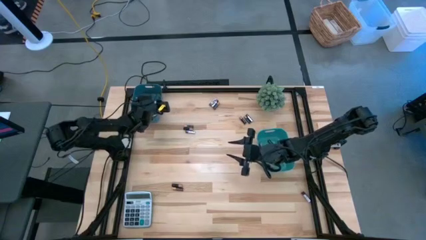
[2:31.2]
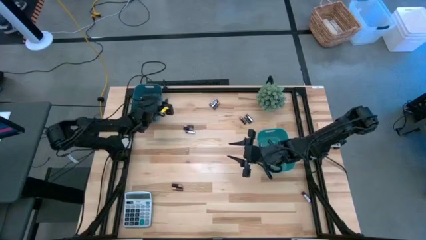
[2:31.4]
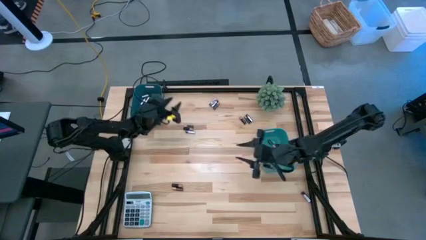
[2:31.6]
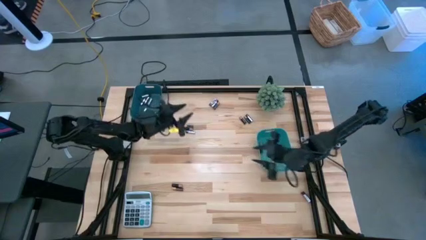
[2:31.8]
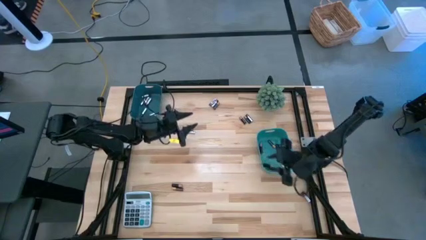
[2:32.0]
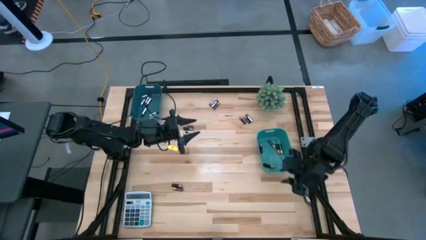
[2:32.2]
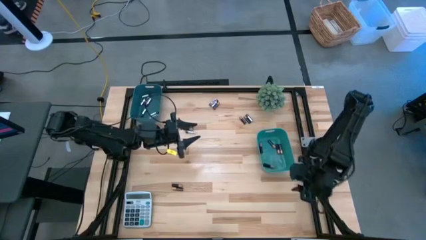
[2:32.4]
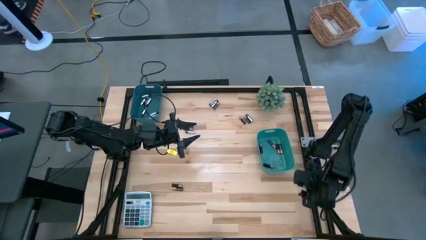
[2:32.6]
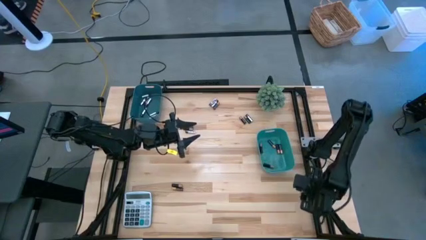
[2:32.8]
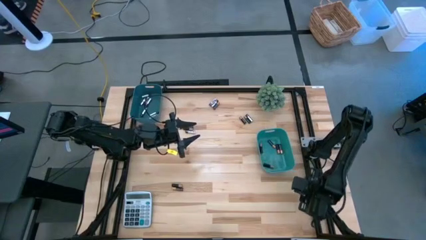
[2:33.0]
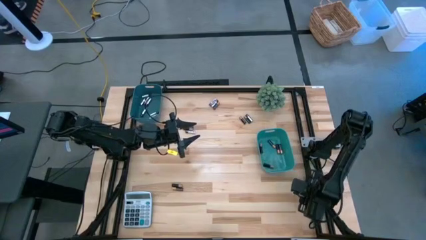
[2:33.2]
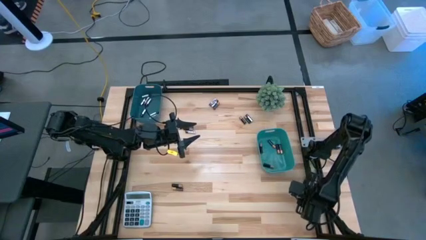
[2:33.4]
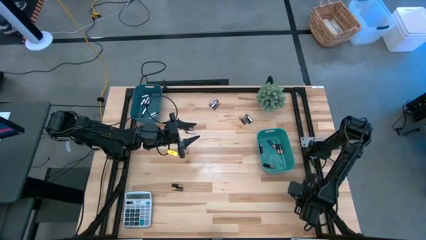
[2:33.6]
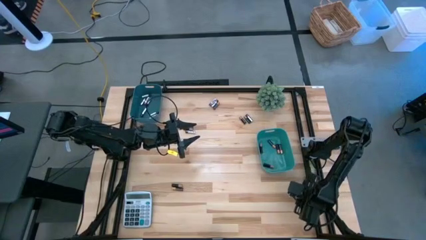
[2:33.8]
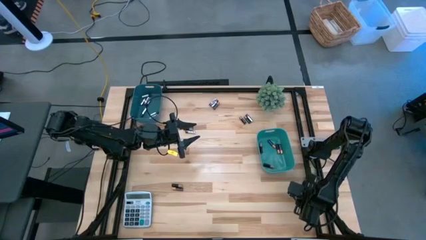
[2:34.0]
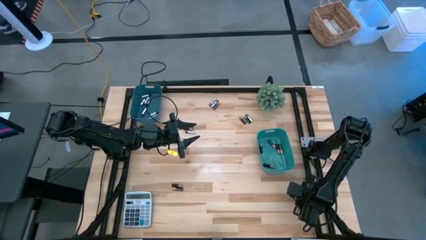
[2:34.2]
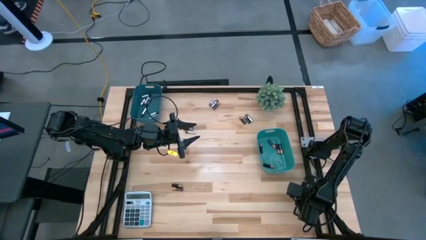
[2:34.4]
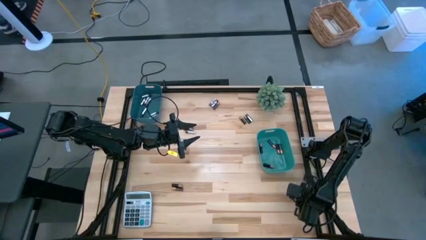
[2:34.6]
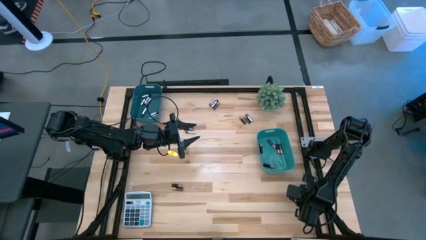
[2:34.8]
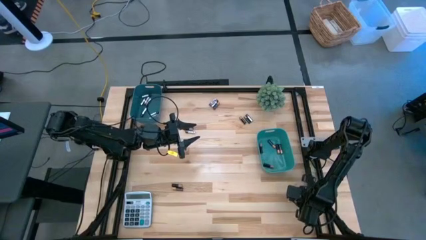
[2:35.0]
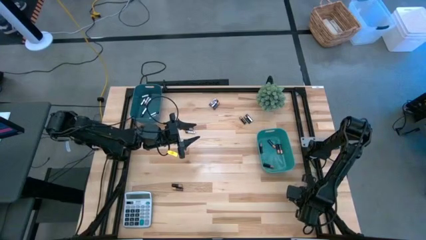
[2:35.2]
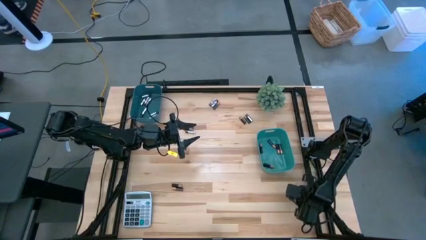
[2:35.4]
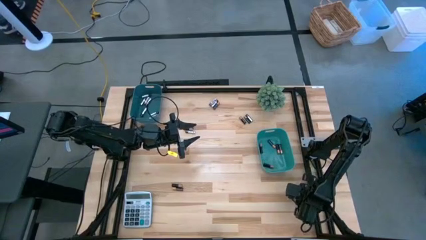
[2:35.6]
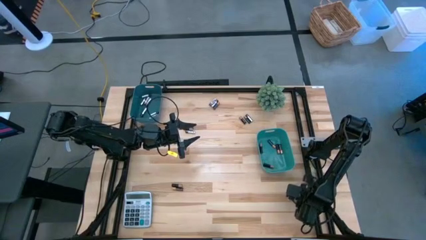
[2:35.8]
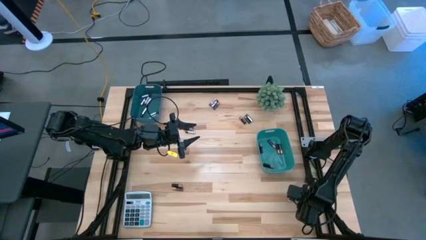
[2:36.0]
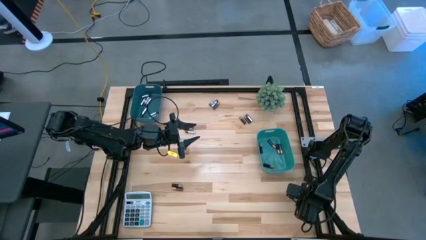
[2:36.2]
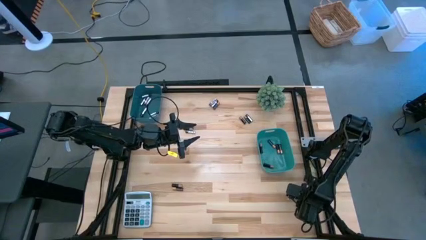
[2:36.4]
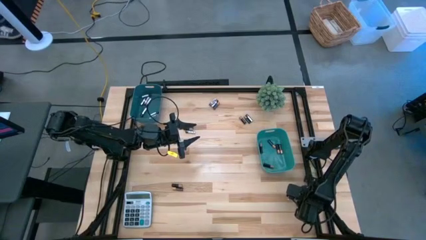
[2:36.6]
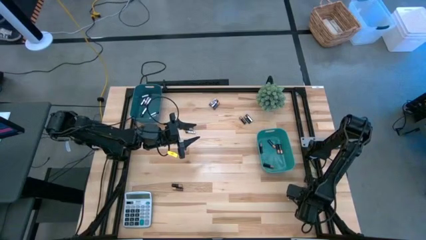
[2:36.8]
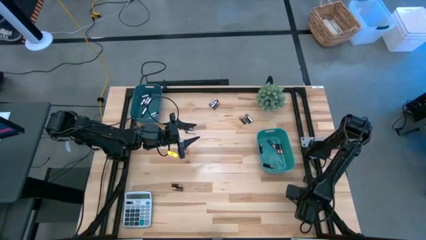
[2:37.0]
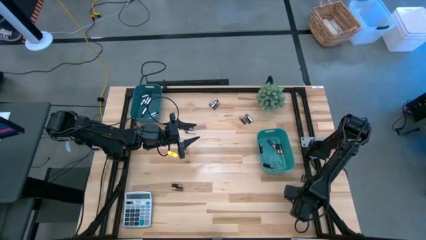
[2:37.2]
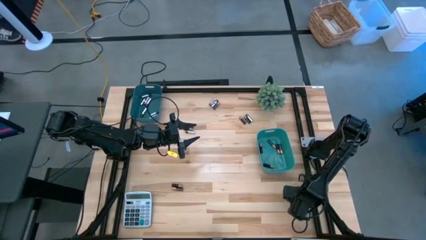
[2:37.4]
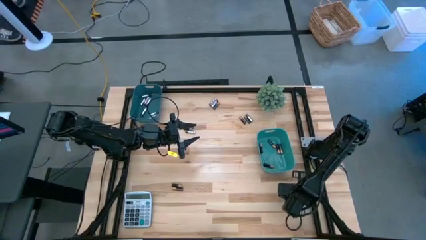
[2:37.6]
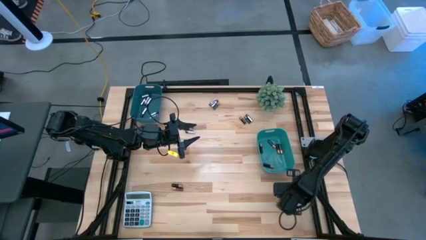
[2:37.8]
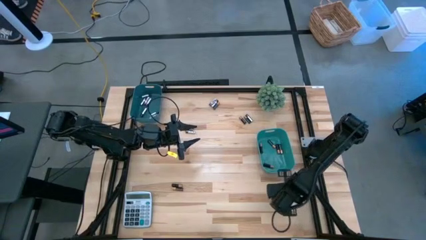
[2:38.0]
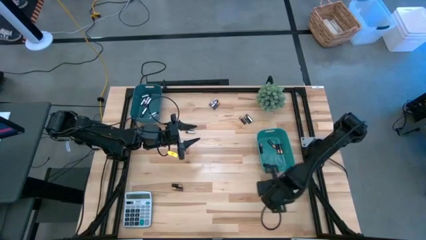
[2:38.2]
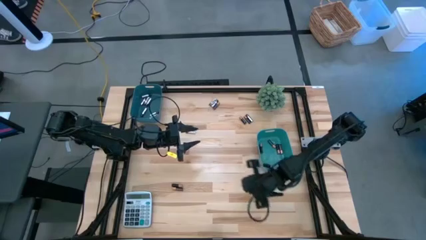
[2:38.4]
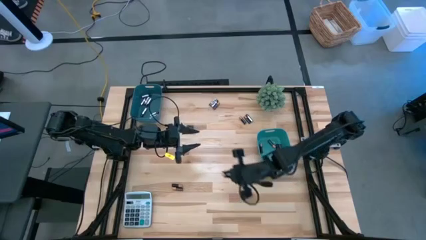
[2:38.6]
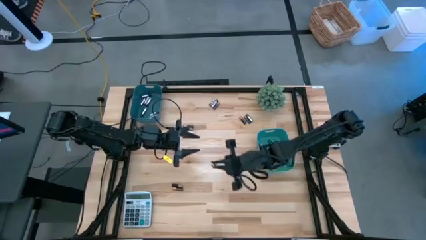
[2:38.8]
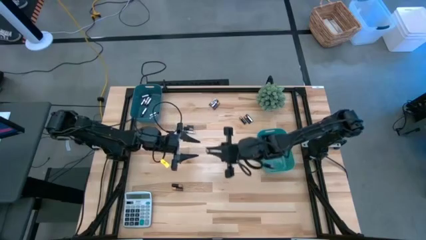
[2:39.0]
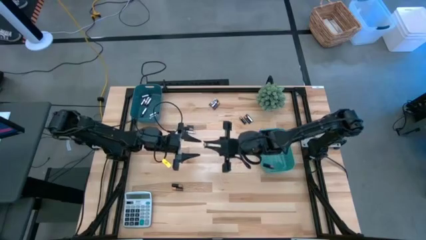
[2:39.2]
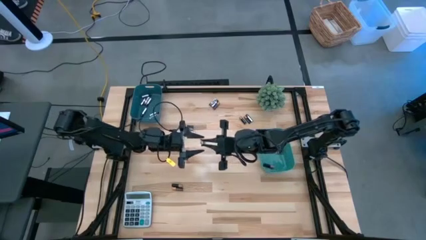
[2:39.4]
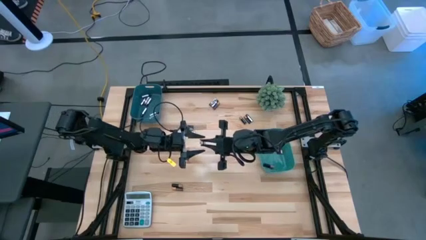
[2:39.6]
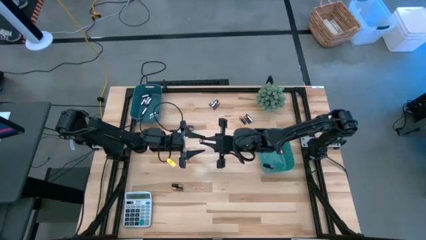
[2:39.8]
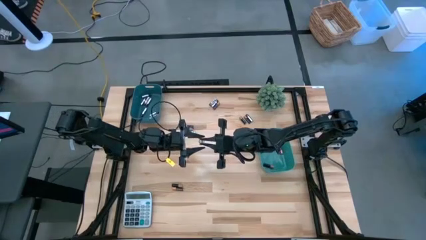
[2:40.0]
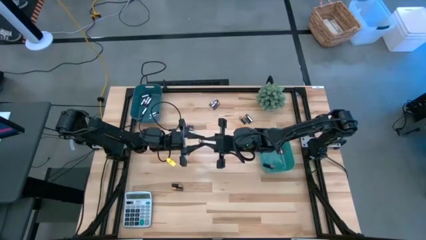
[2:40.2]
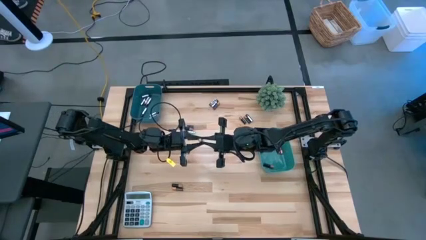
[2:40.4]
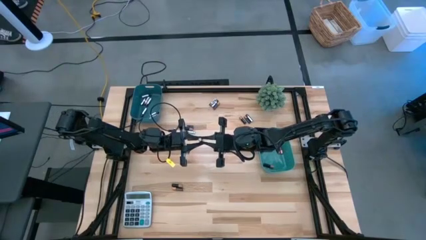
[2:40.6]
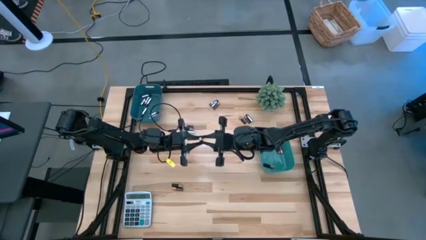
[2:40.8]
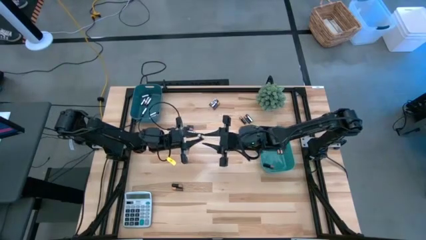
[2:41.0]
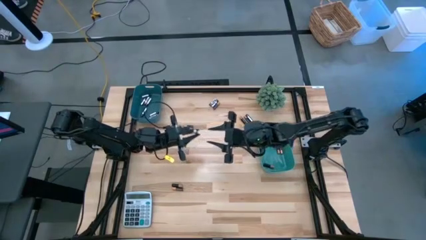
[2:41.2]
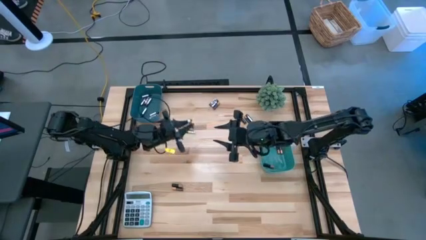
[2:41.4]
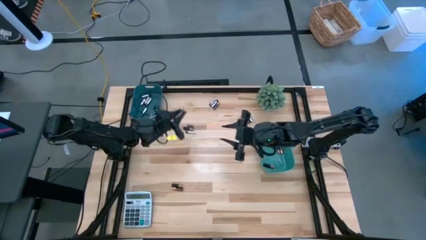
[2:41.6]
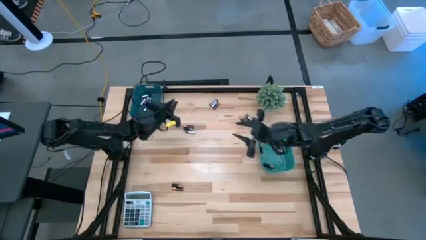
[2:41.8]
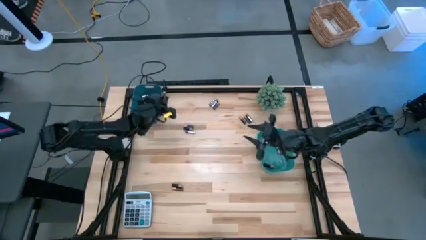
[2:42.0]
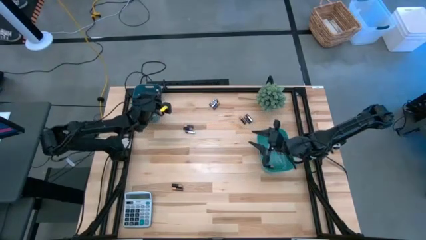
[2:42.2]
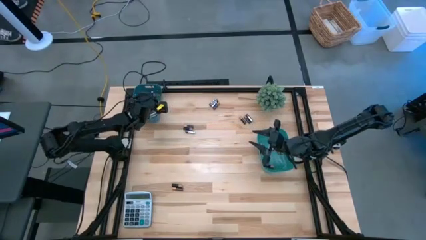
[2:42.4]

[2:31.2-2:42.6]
Task: Sort batteries
Put the black-silver battery into the blue bin

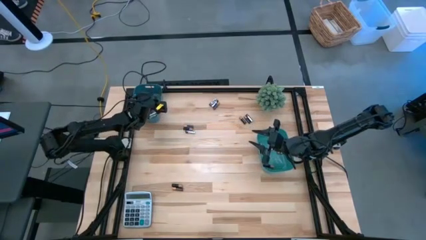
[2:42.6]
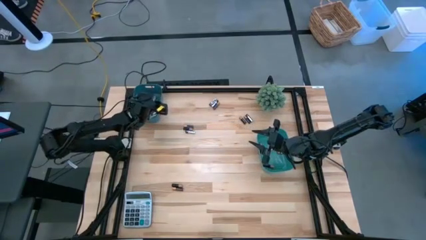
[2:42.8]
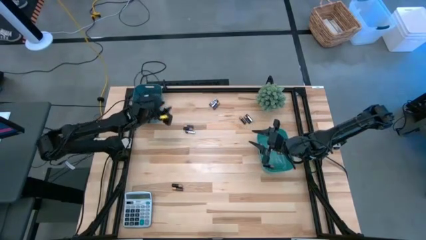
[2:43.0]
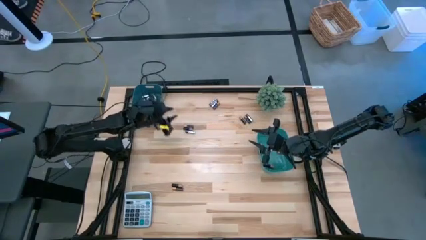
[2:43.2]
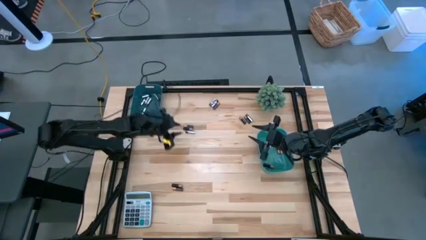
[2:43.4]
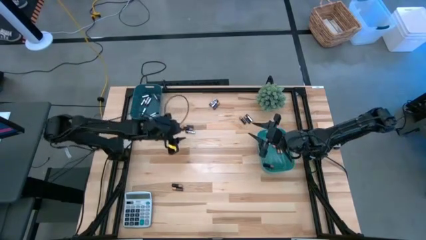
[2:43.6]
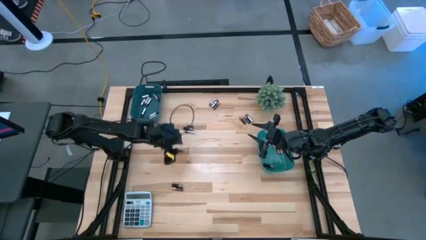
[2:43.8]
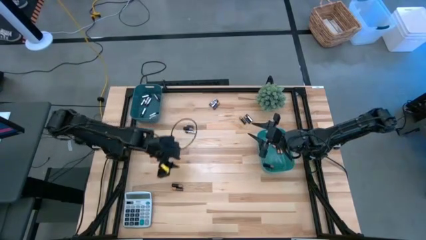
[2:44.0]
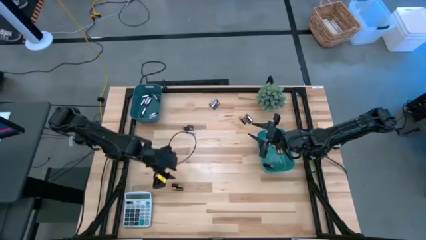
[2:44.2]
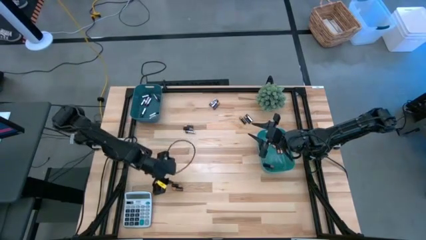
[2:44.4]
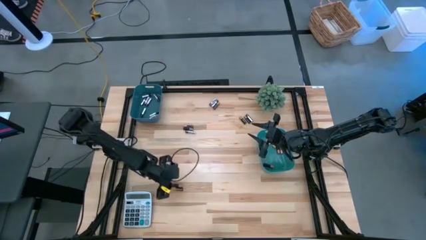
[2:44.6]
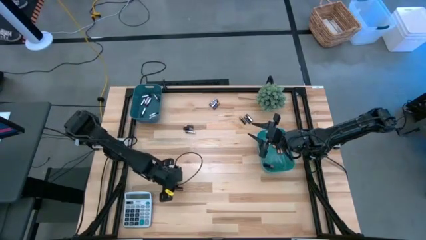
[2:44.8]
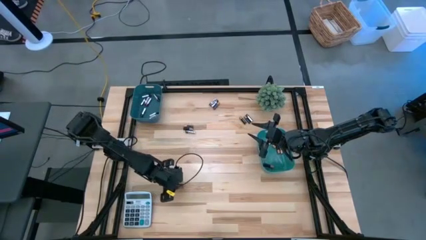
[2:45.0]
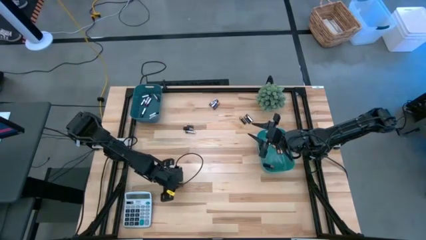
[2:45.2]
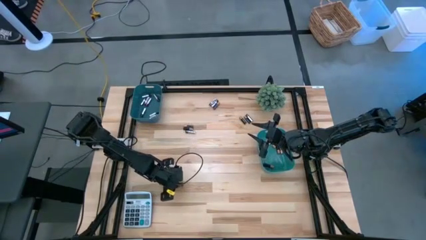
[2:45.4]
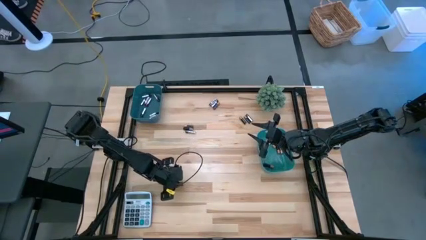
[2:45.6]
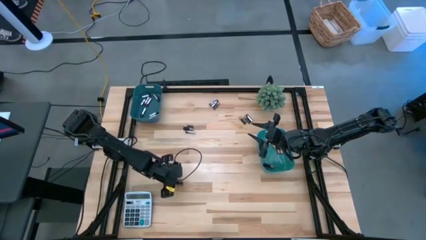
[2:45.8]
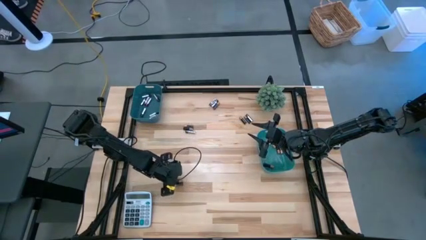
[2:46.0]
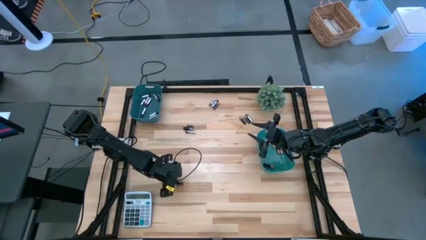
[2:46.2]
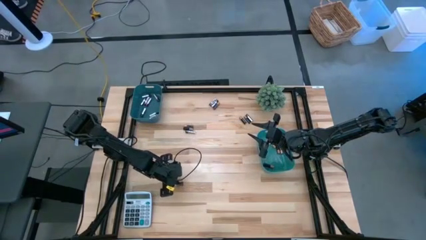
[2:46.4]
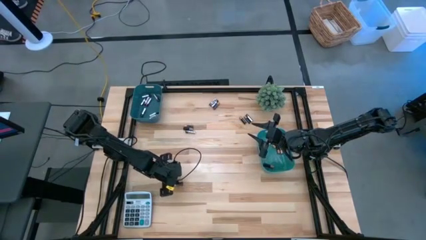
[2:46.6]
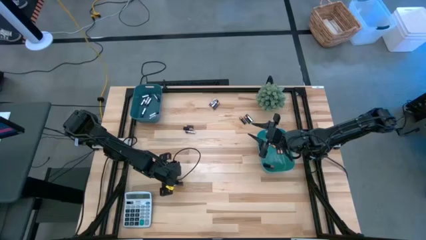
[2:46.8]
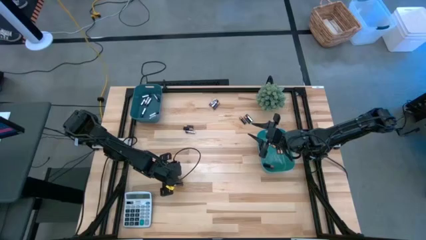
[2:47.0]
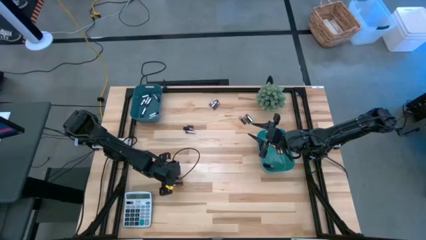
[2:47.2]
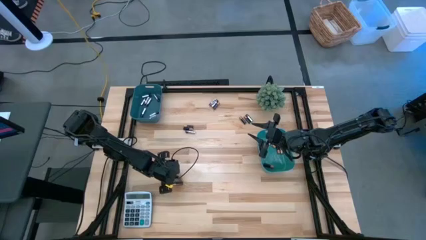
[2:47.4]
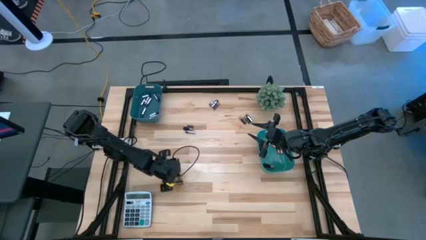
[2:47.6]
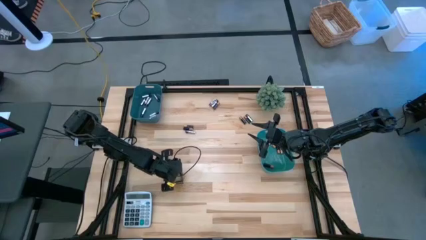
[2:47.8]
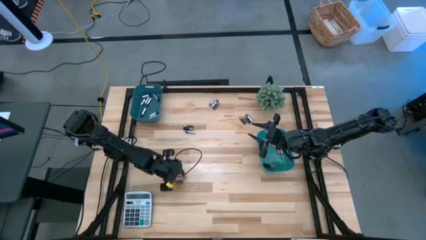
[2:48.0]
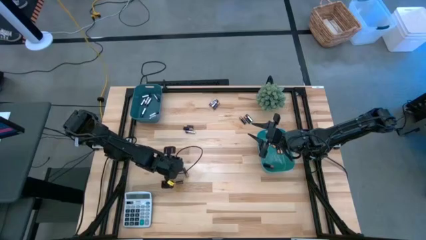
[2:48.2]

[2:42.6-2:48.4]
Put the black battery into the bin
